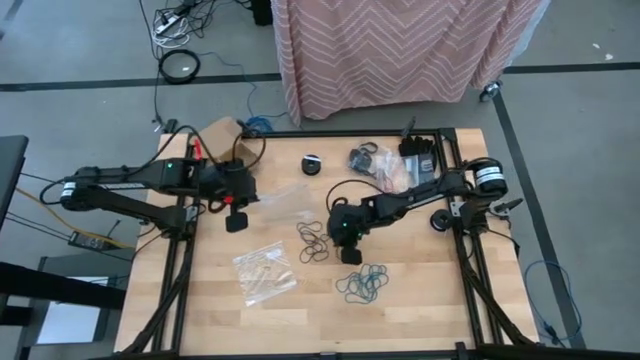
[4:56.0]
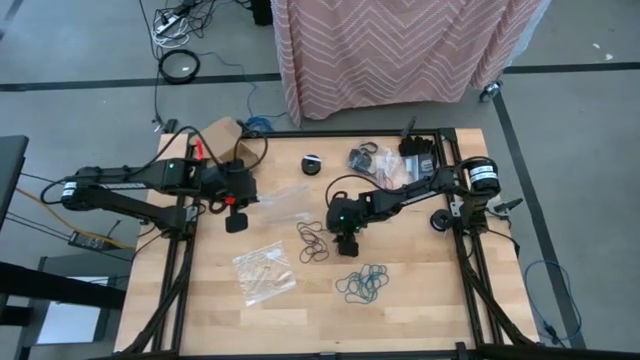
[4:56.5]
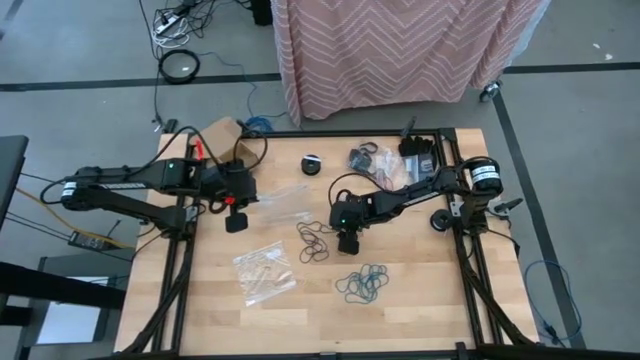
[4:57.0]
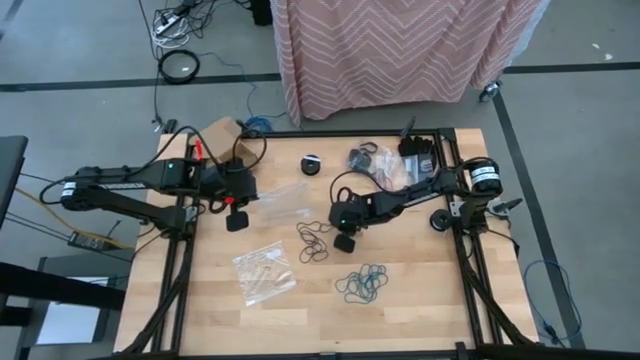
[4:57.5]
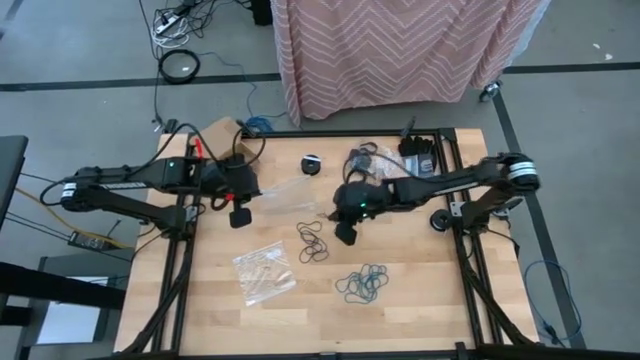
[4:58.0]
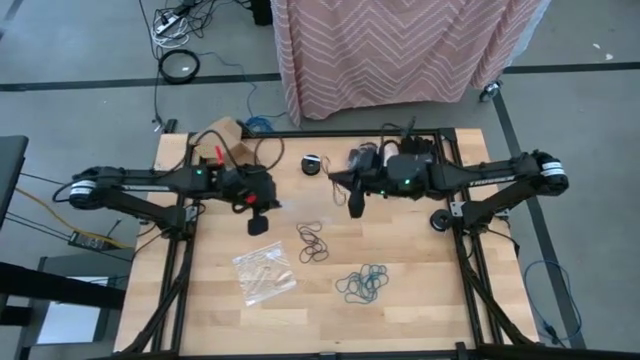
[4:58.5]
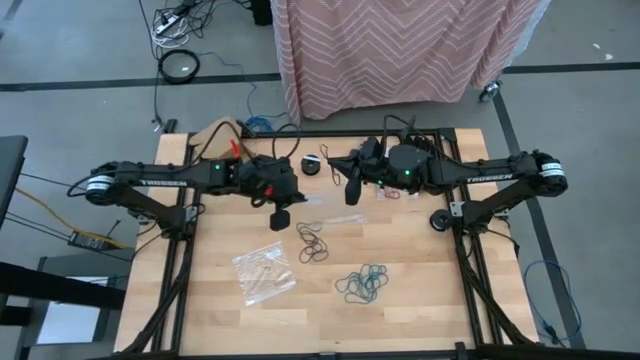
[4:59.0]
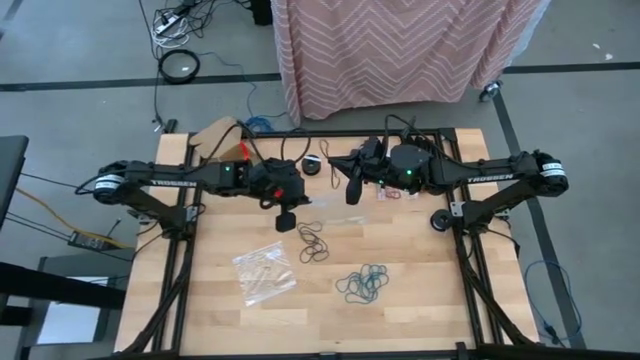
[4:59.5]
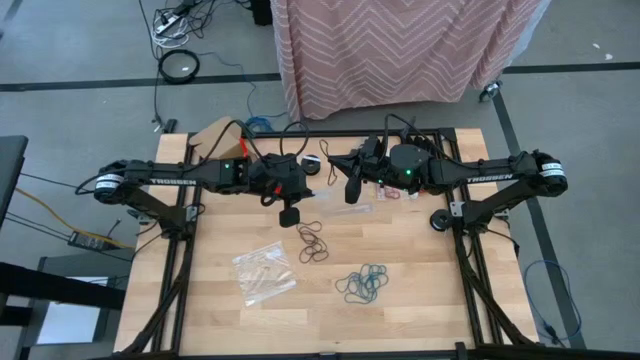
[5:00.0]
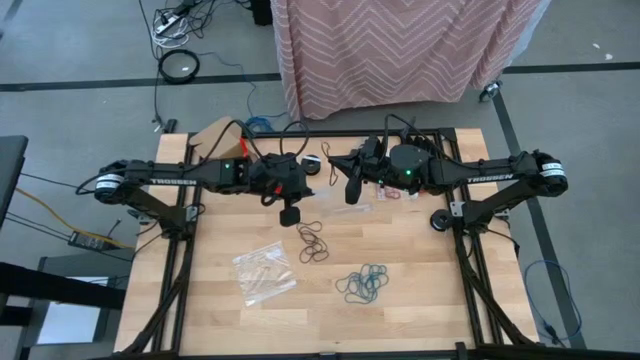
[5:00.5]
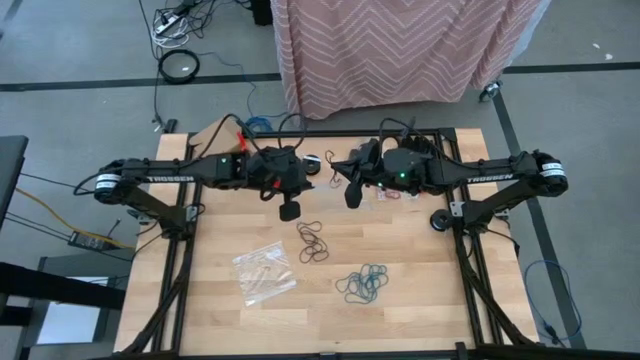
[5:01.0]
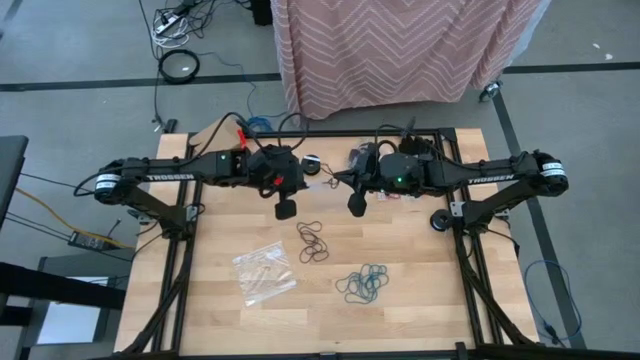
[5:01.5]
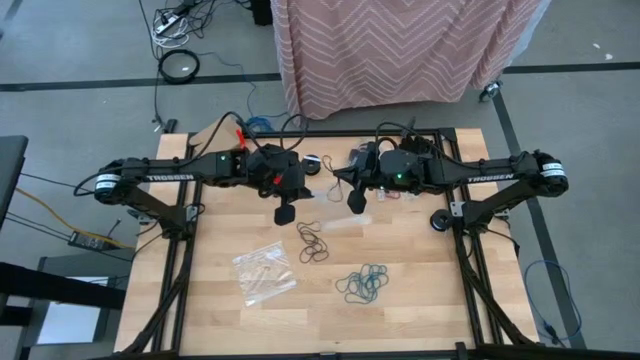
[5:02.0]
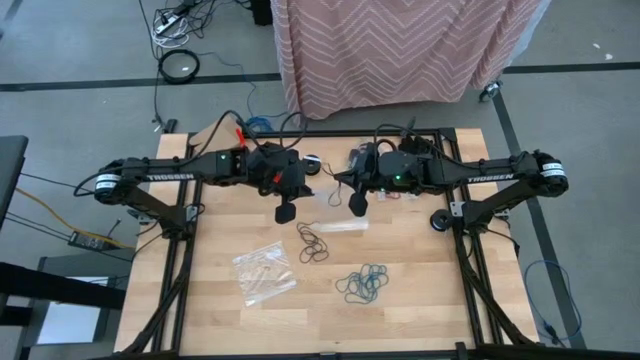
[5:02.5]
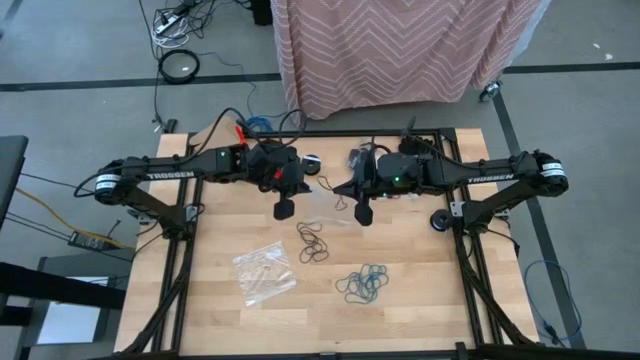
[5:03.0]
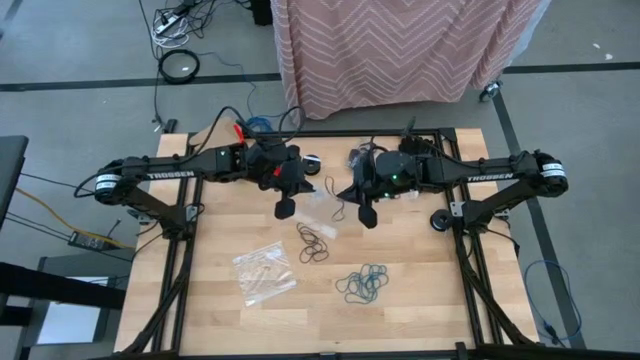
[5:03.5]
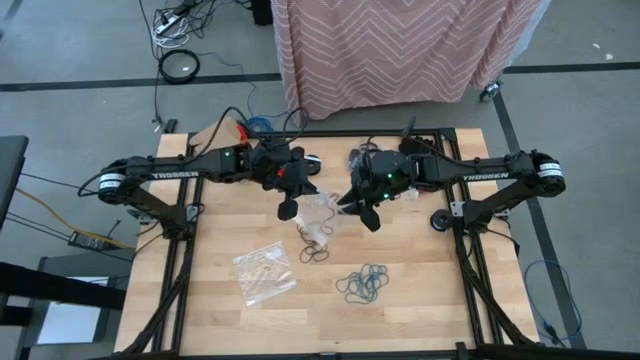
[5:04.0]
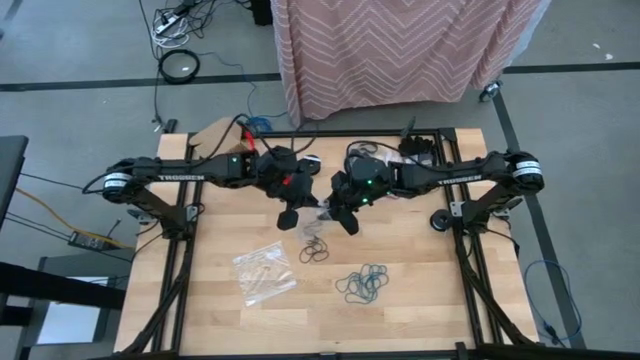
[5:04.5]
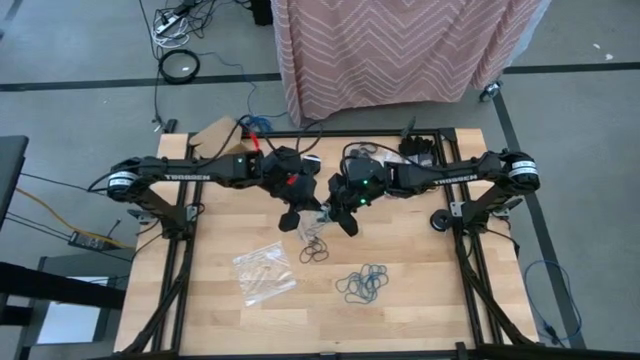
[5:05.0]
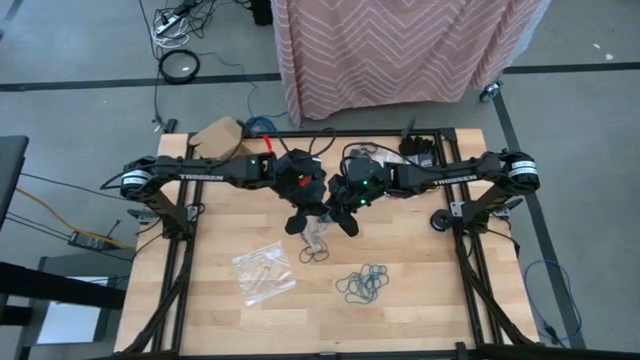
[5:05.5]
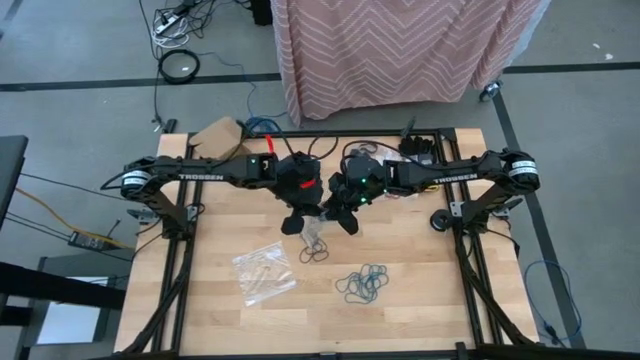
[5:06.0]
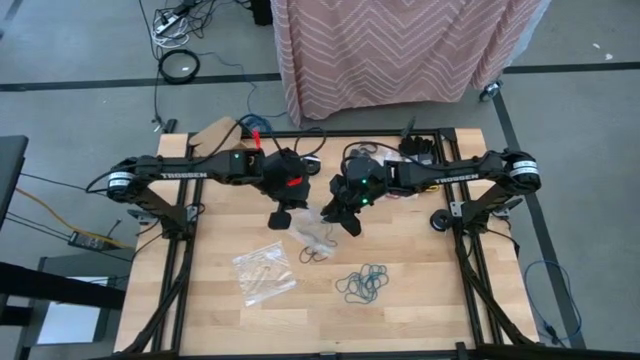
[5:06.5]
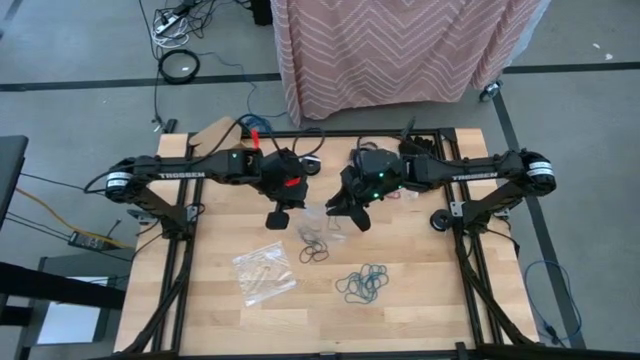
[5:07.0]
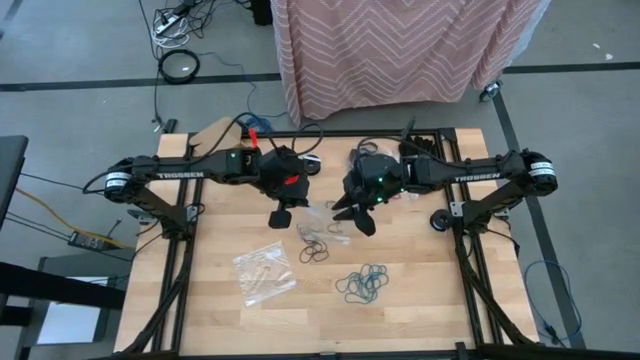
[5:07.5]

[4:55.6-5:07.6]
Task: Sort rubber bands
Put the violet rubber band into the transparent bag

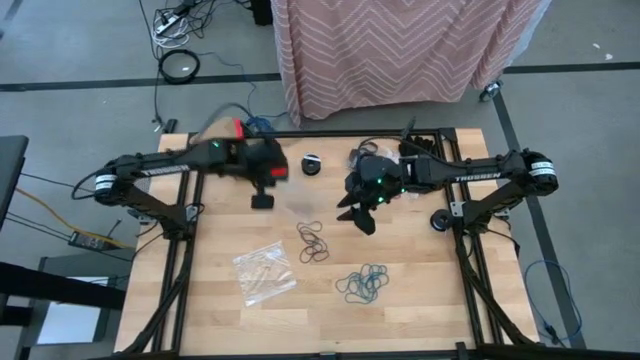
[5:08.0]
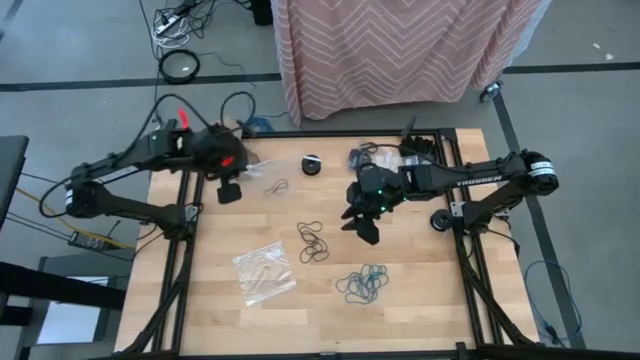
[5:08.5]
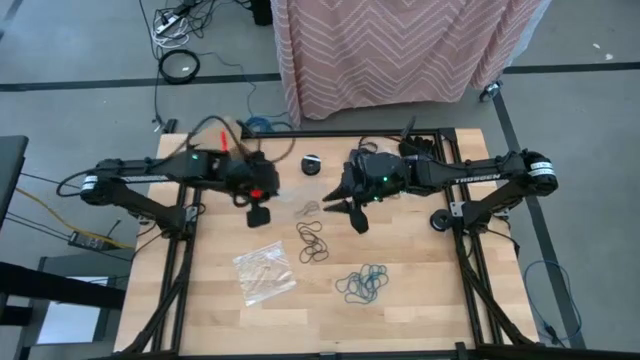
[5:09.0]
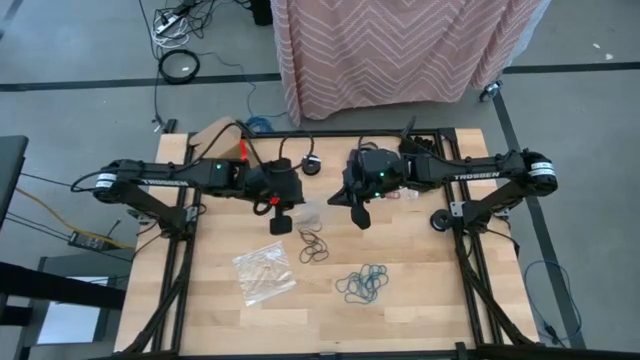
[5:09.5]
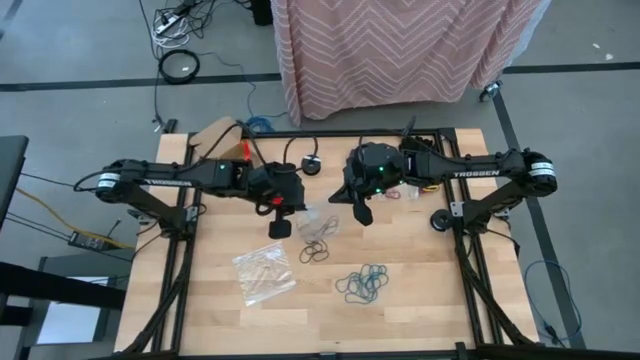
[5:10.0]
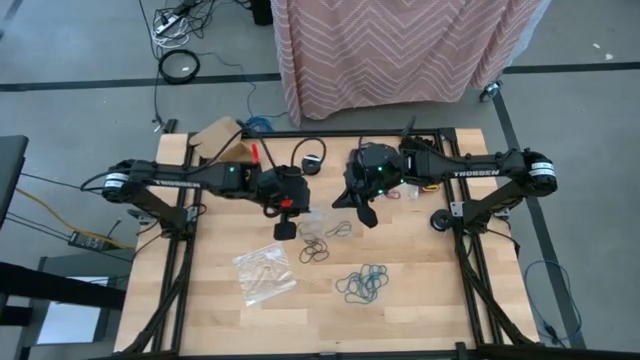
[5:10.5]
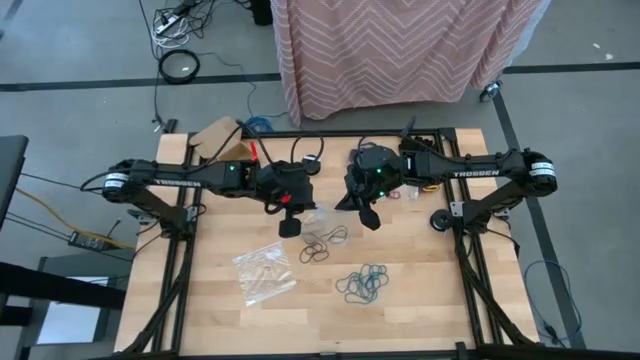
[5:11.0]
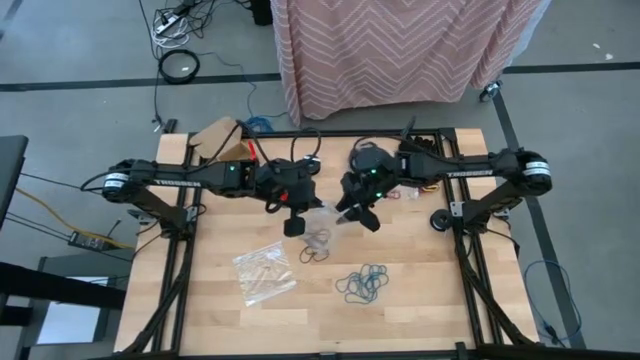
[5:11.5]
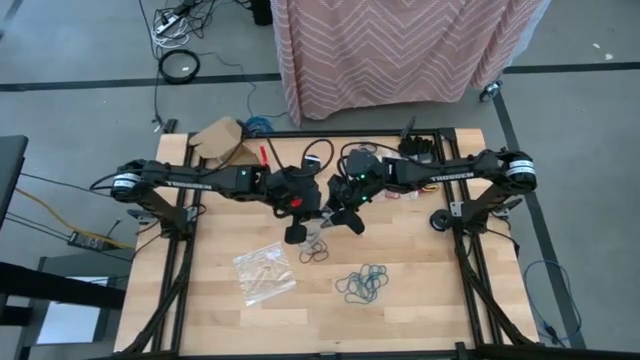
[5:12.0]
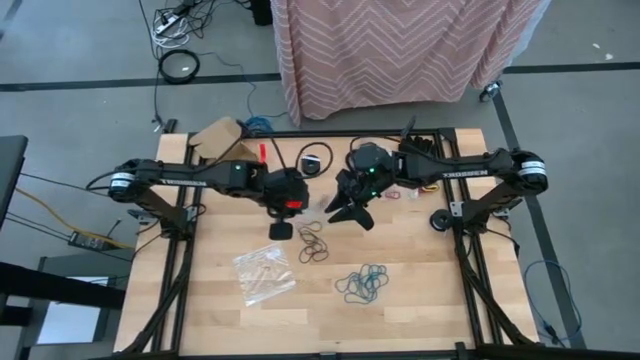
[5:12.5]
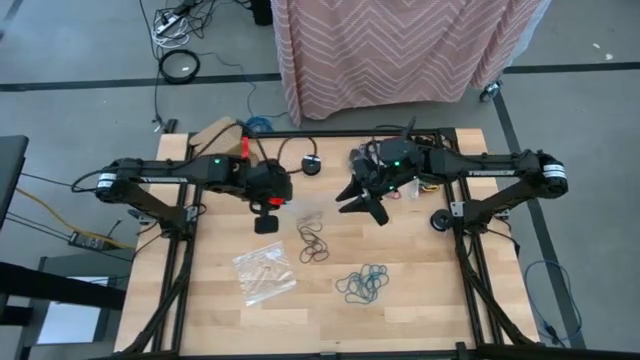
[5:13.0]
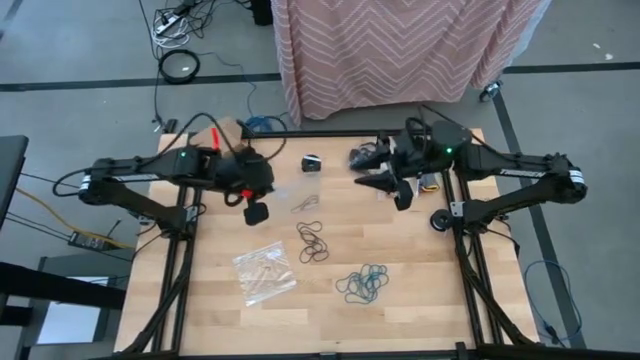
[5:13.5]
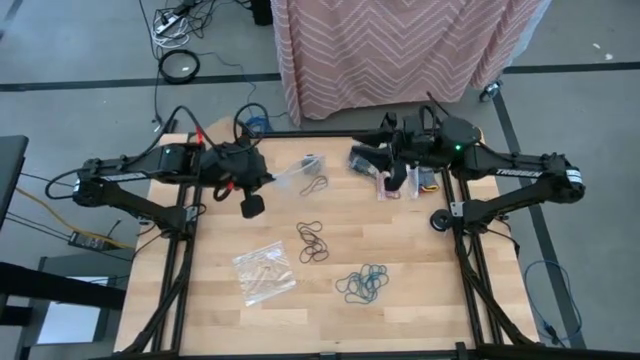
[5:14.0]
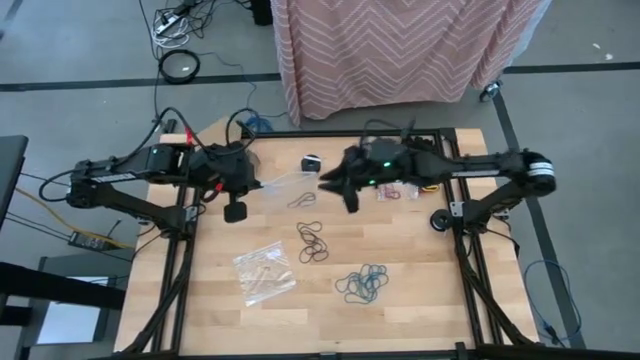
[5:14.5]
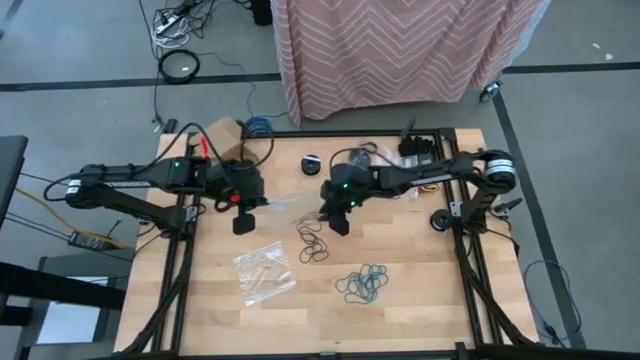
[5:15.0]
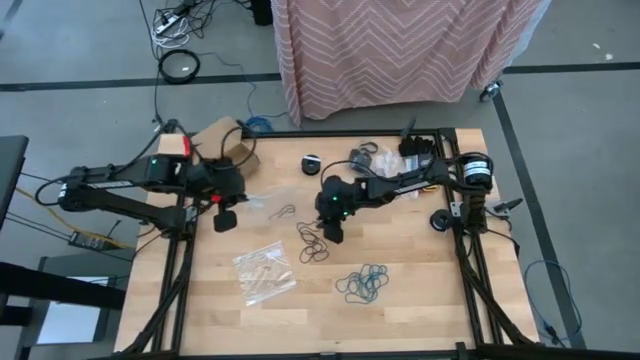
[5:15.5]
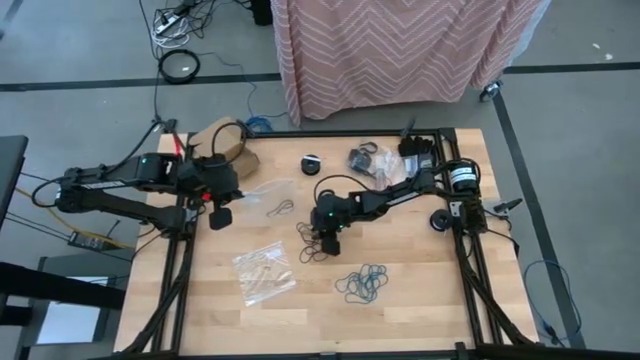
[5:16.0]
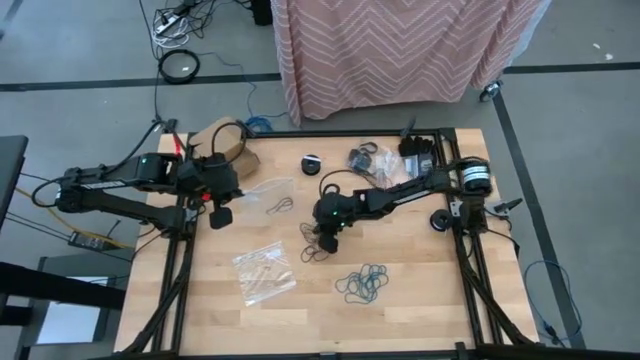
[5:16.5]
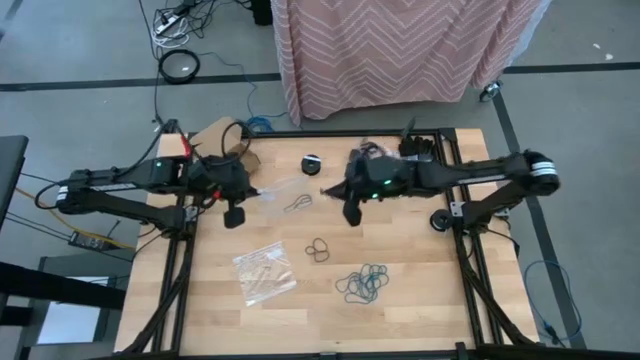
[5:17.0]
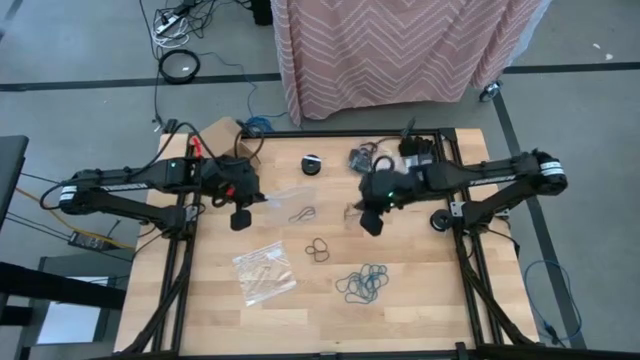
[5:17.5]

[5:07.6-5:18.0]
Put the violet rubber band into the transparent bag
